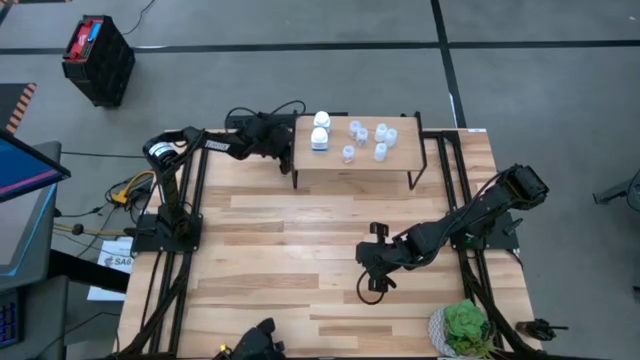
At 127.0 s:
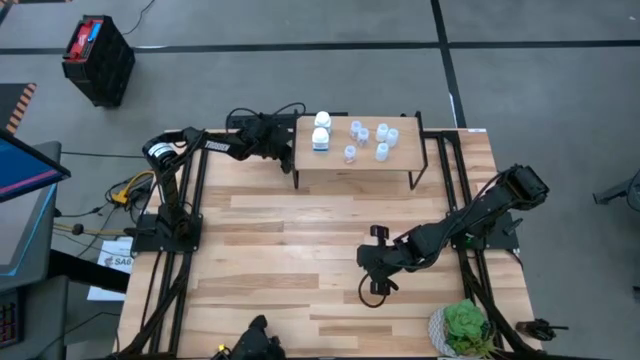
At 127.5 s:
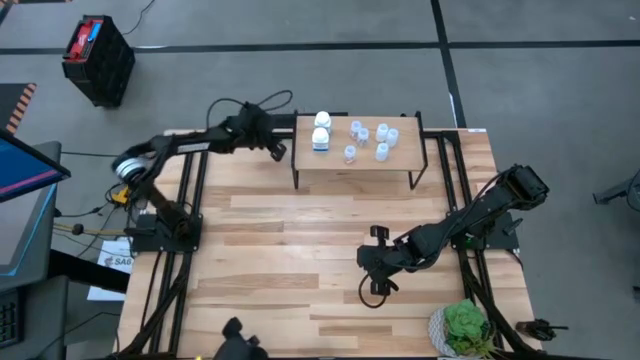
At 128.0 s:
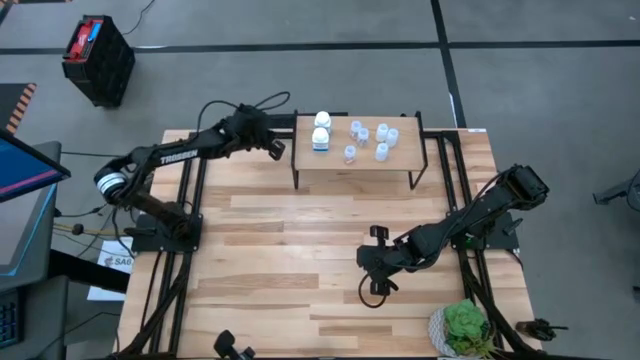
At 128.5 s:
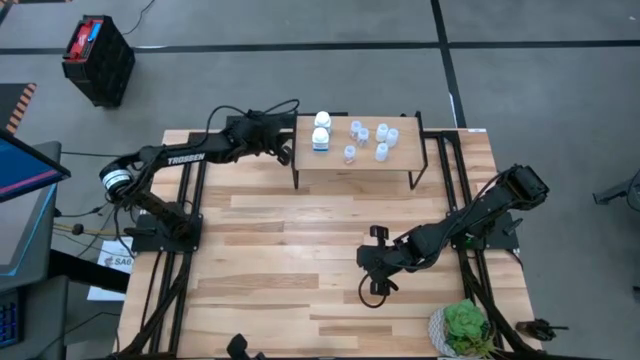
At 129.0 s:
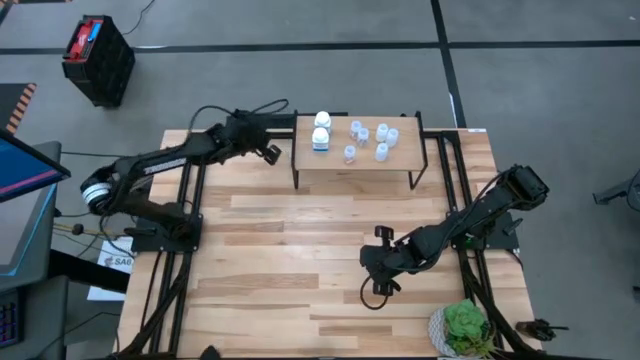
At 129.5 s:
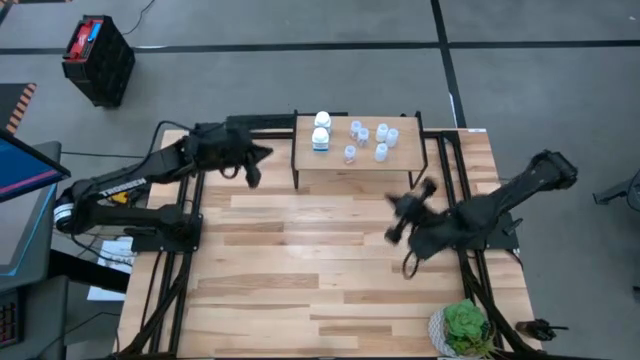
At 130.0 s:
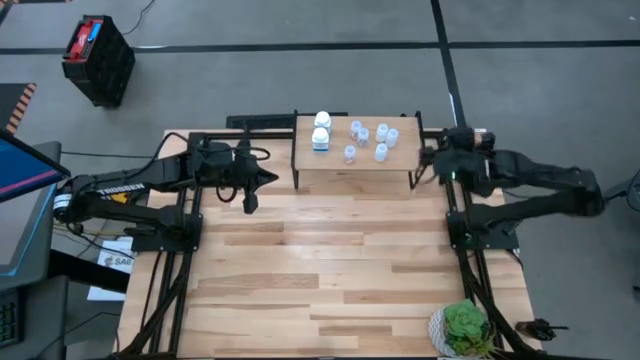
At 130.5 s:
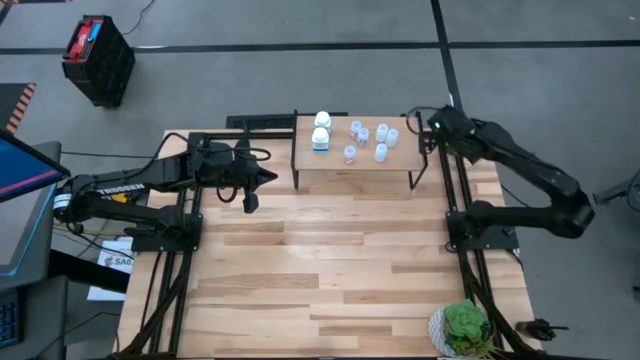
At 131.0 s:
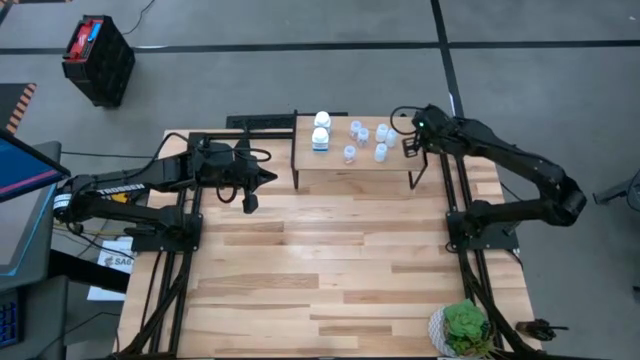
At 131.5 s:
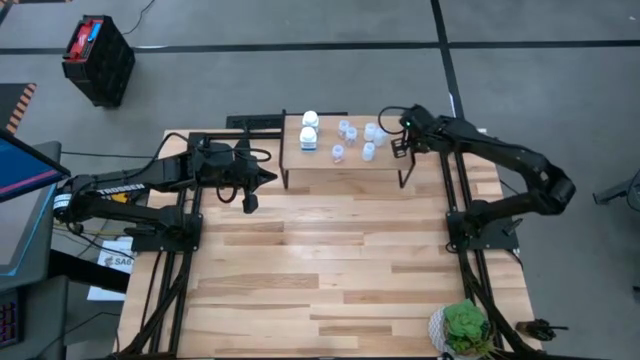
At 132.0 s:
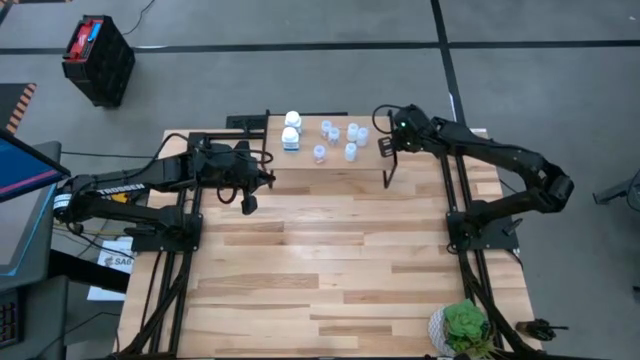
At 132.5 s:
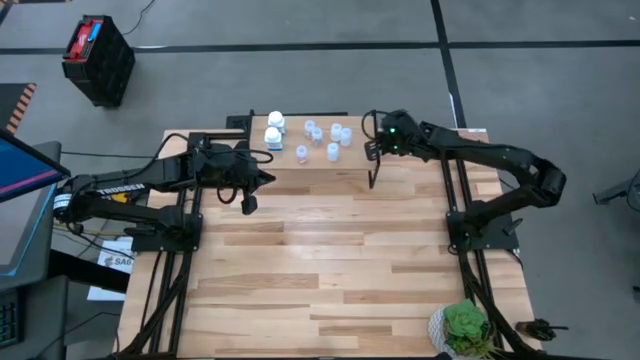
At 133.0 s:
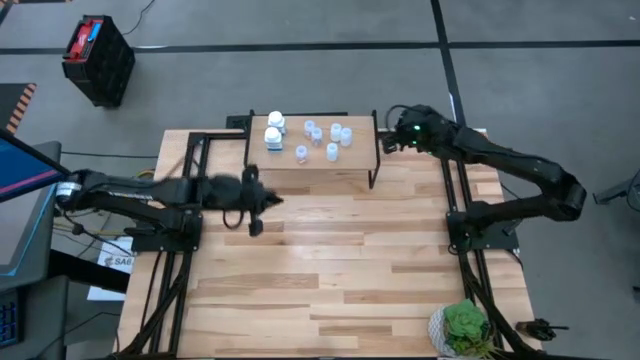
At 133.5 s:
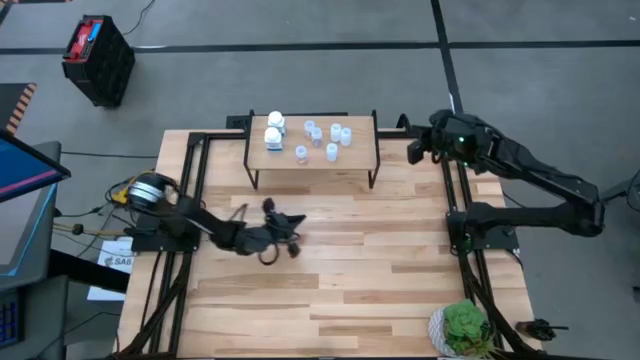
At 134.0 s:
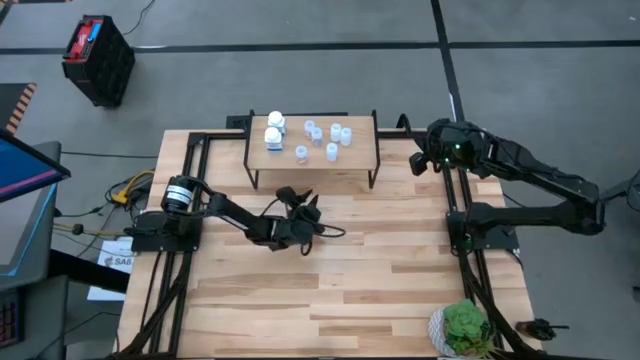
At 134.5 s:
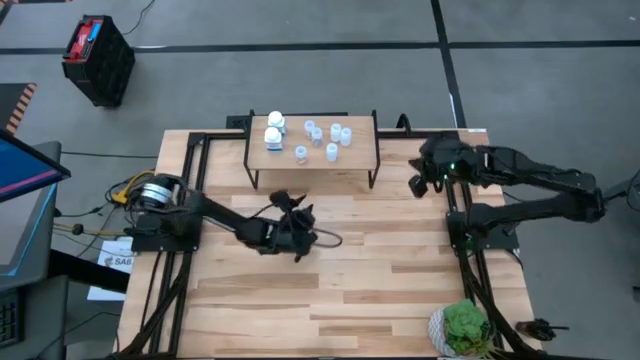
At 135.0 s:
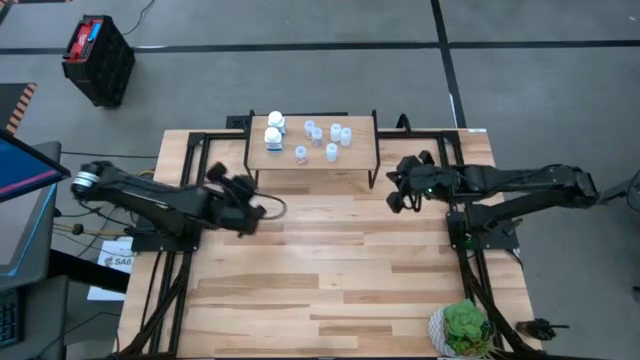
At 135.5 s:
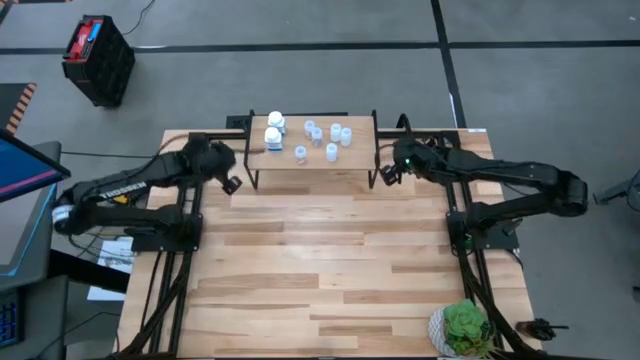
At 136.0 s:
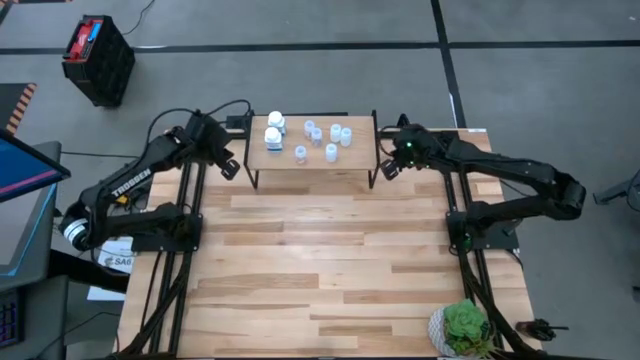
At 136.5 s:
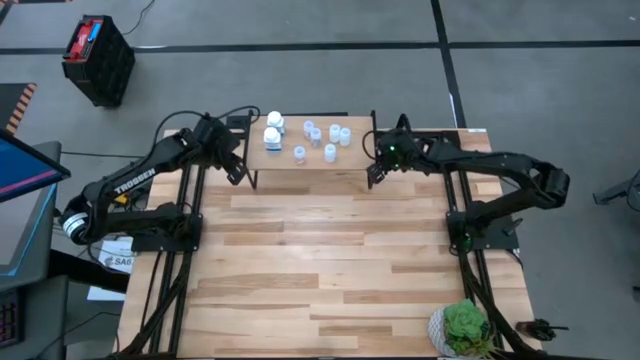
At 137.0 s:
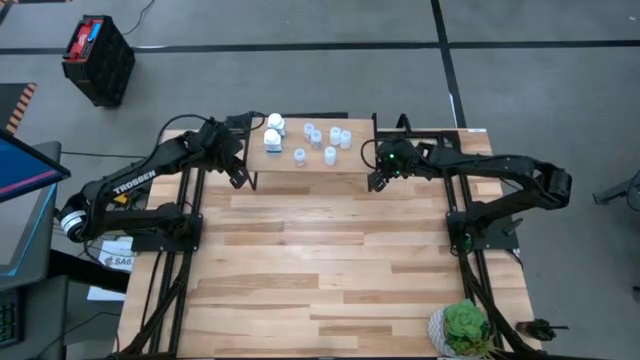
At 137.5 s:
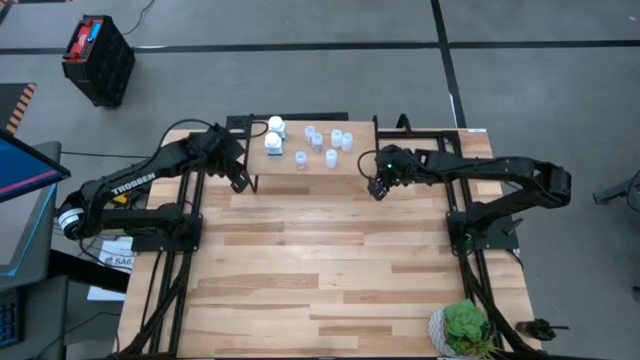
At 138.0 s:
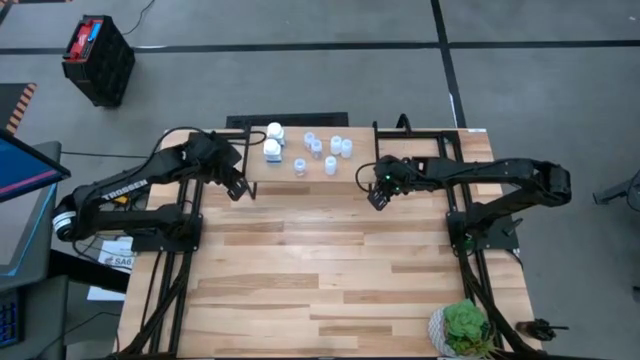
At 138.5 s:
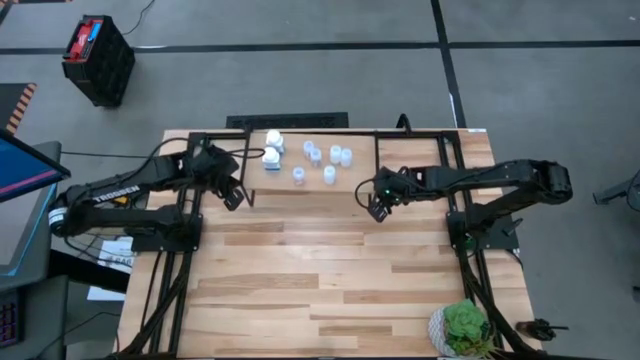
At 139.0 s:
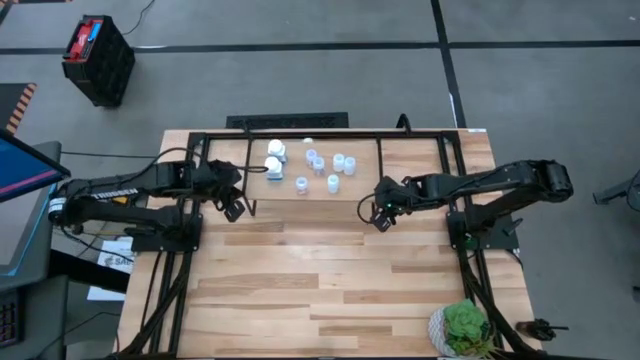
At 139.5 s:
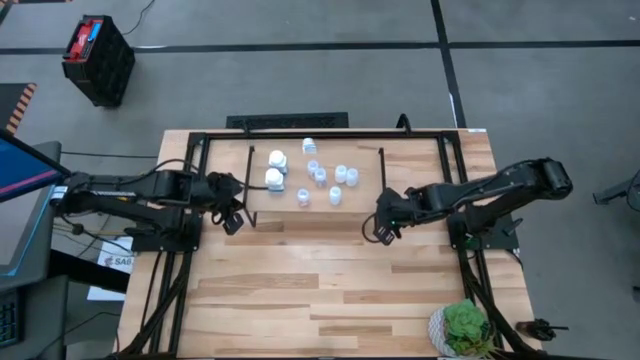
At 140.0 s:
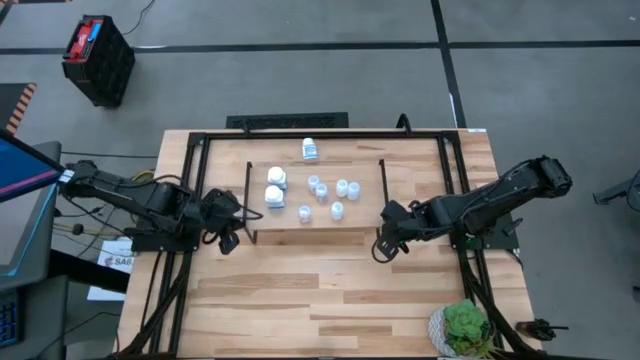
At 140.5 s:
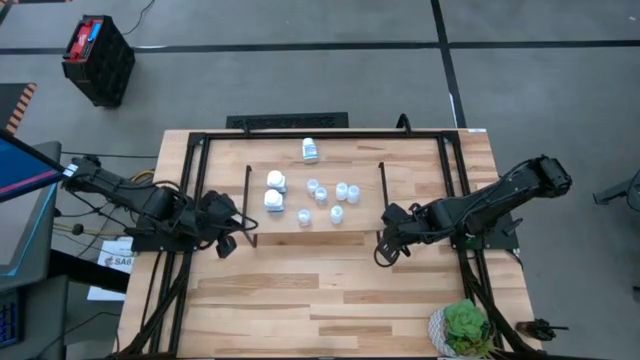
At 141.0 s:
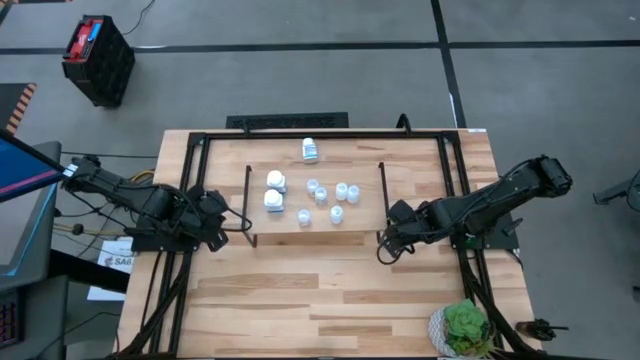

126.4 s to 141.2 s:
Task: Pick and place medicine bottles onto shelf by color
Move the shelf slightly to the center of the table

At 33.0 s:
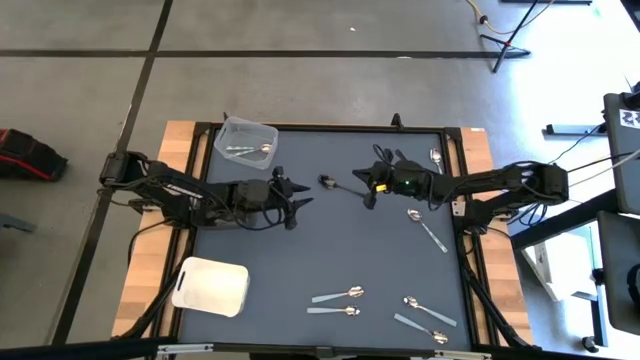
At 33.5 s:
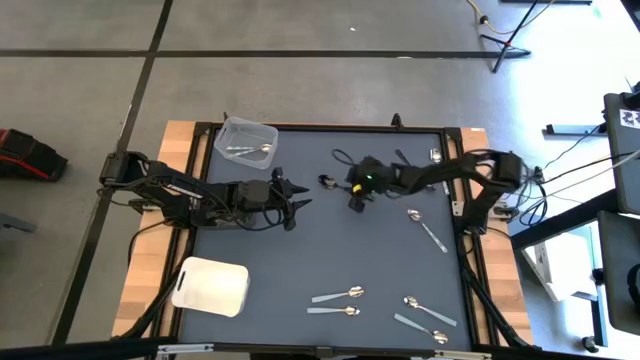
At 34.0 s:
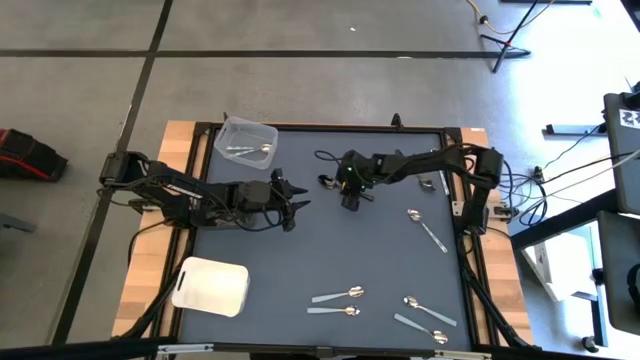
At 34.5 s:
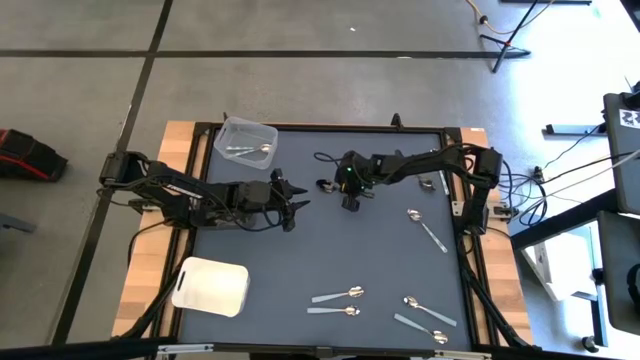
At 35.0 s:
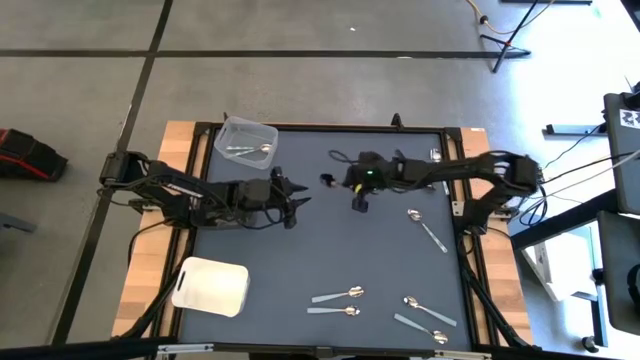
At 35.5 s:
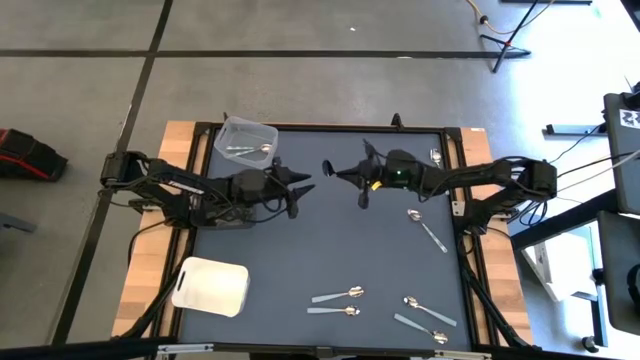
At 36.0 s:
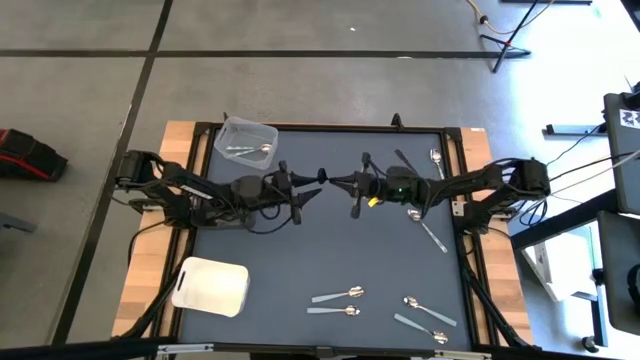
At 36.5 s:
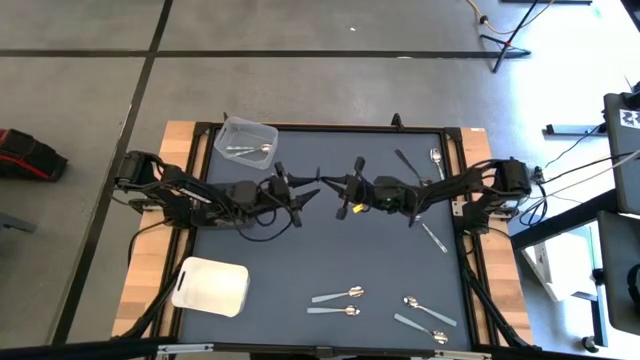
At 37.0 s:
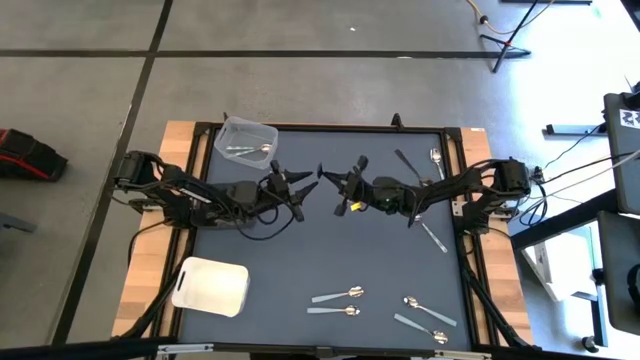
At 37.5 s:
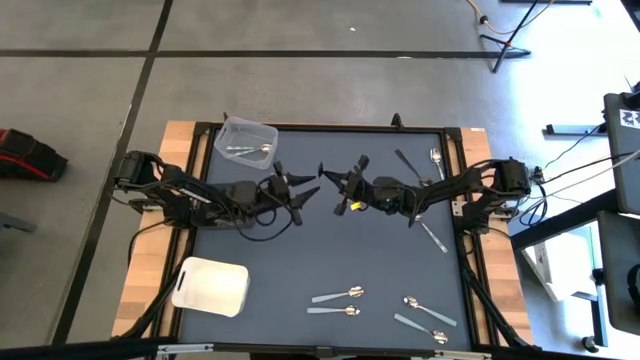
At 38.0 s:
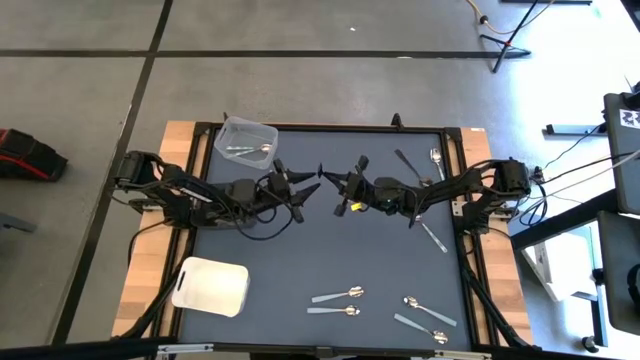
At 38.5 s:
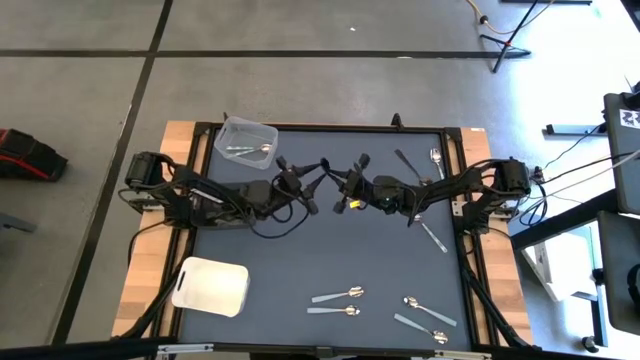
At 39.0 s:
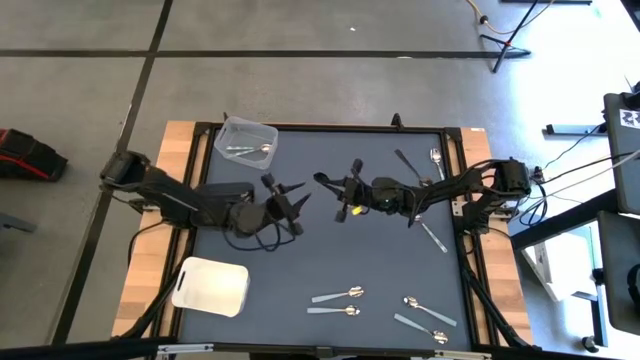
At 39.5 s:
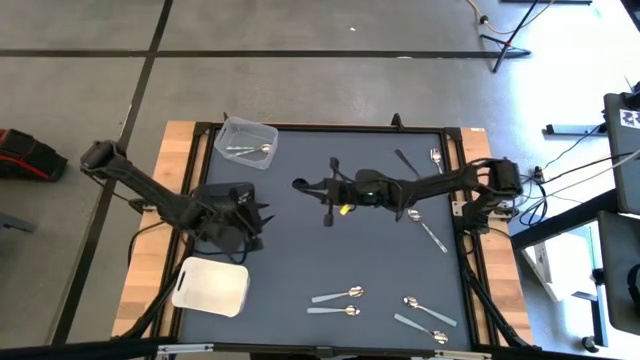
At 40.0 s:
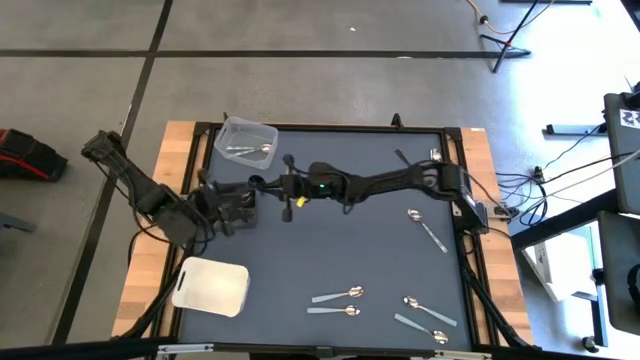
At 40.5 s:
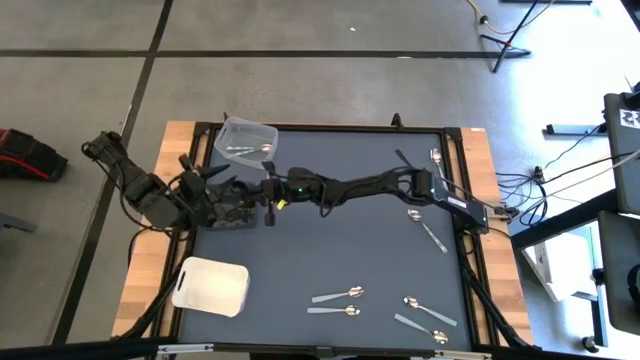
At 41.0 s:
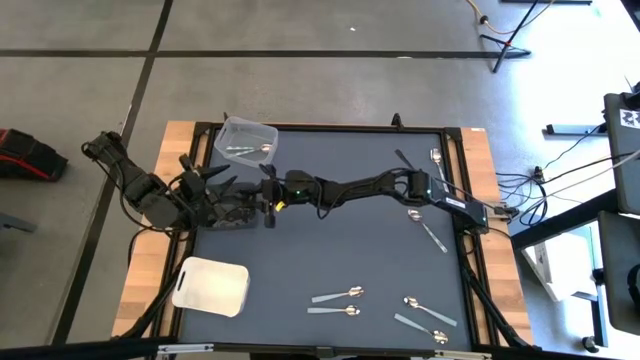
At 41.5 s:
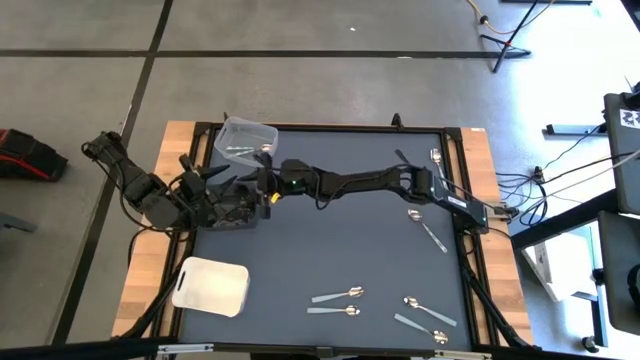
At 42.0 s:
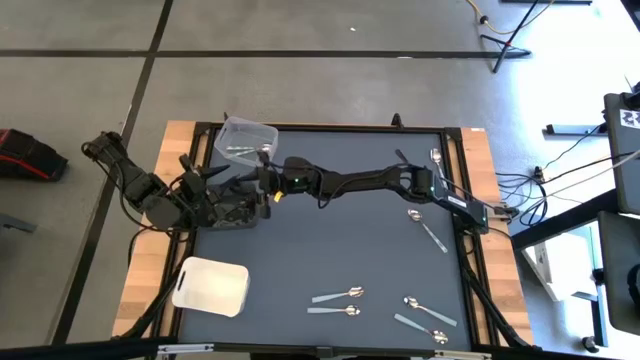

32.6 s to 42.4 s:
Task: Sort silverware by color (type)
Put the black spoon into the black bin
